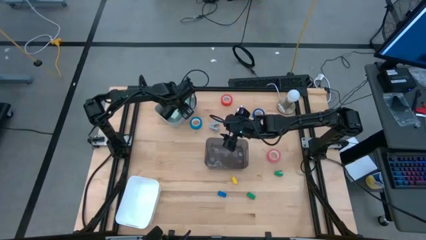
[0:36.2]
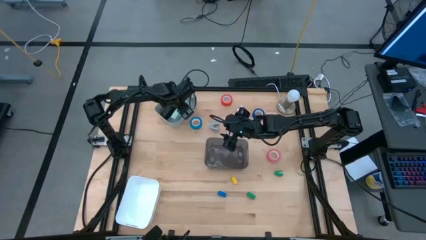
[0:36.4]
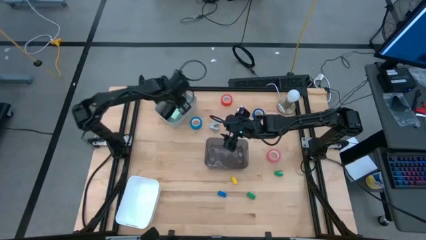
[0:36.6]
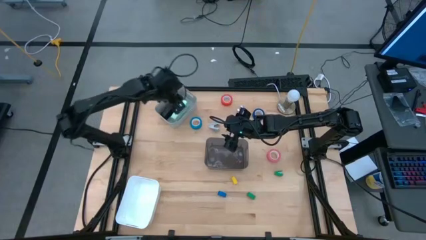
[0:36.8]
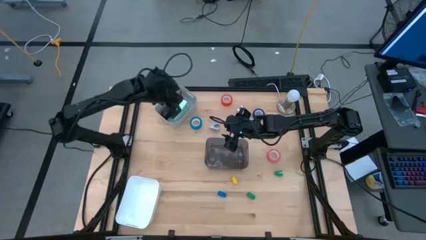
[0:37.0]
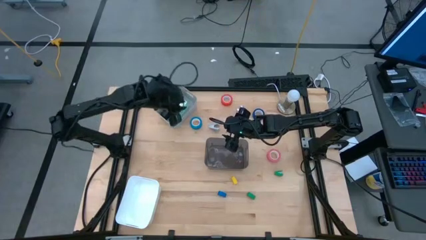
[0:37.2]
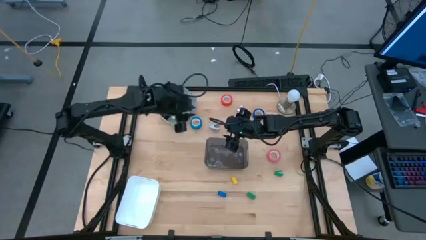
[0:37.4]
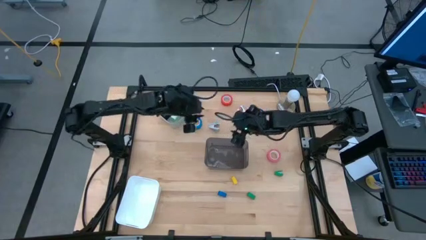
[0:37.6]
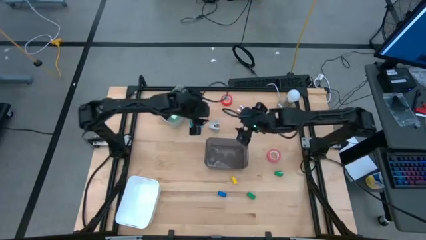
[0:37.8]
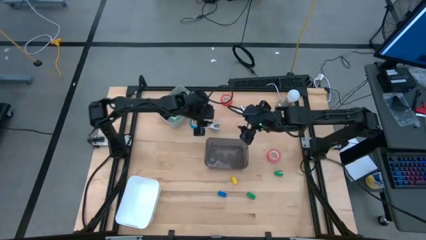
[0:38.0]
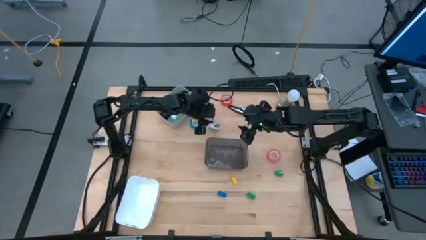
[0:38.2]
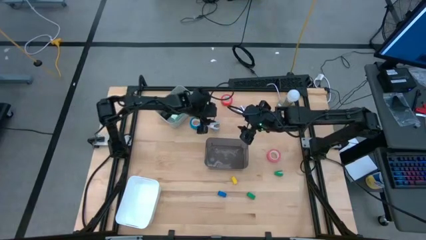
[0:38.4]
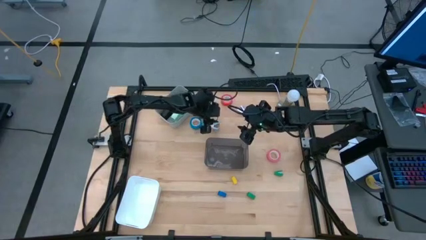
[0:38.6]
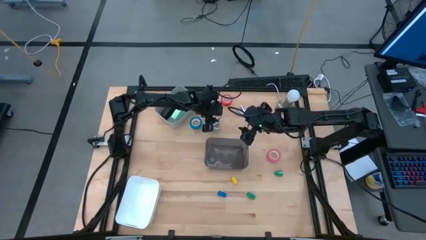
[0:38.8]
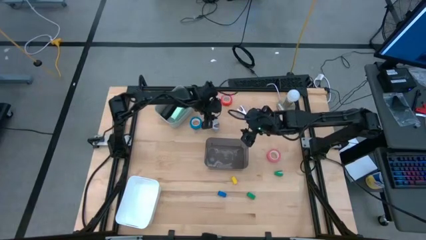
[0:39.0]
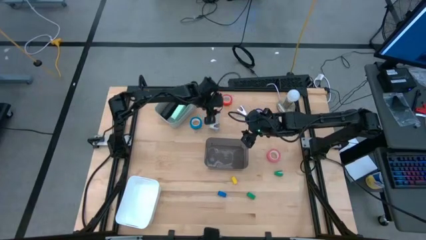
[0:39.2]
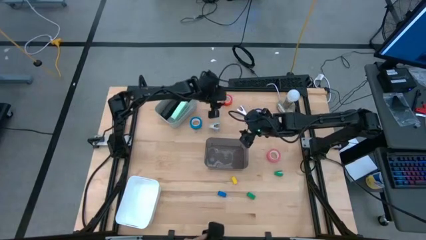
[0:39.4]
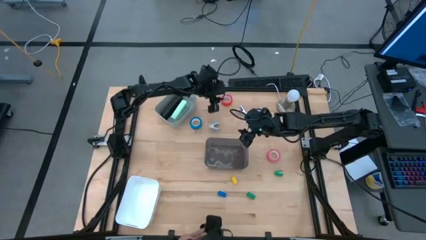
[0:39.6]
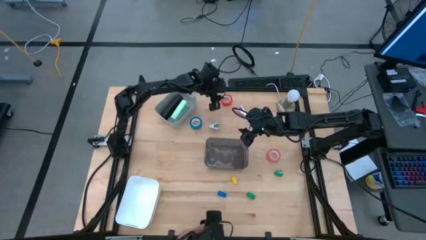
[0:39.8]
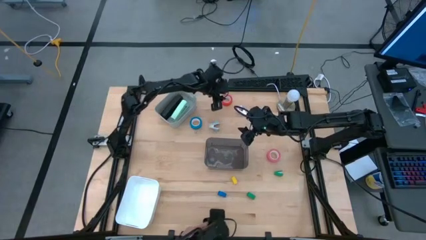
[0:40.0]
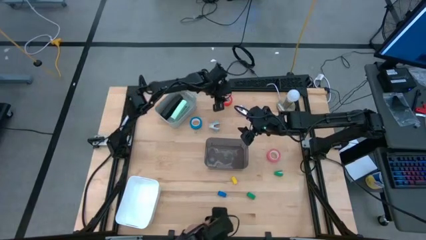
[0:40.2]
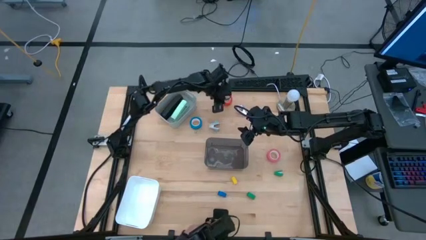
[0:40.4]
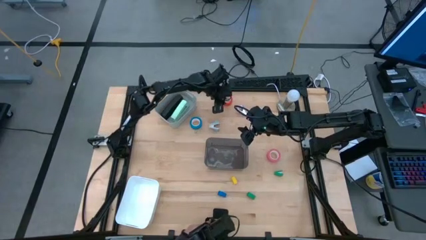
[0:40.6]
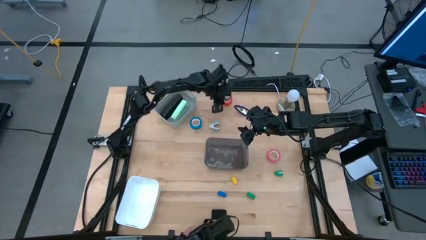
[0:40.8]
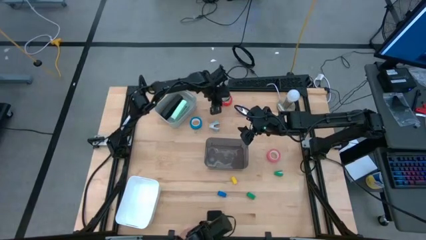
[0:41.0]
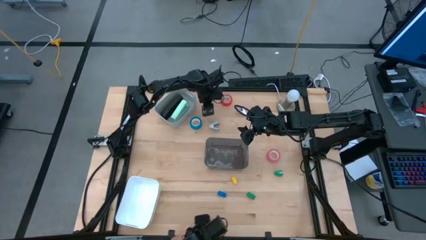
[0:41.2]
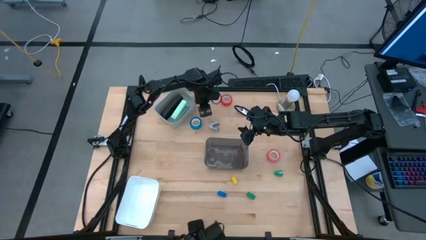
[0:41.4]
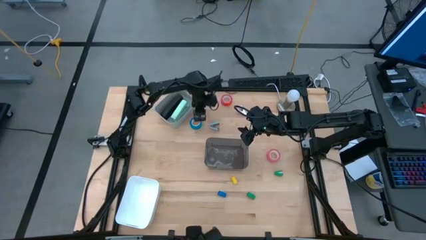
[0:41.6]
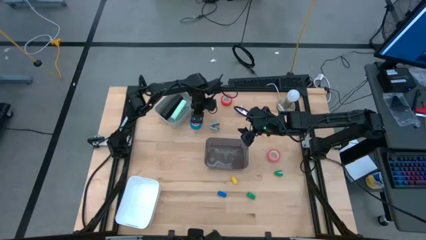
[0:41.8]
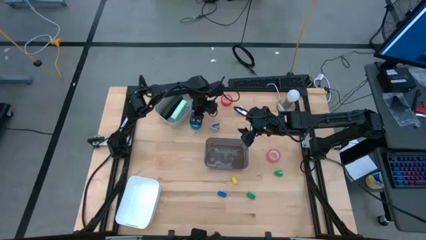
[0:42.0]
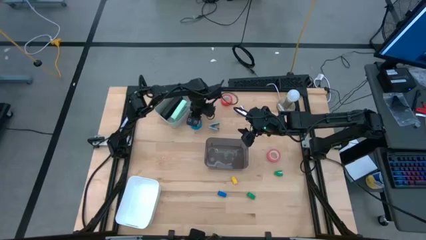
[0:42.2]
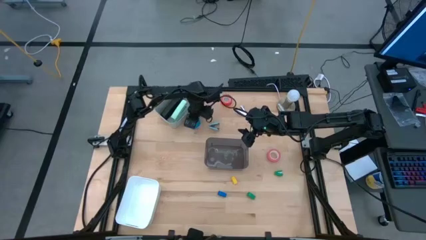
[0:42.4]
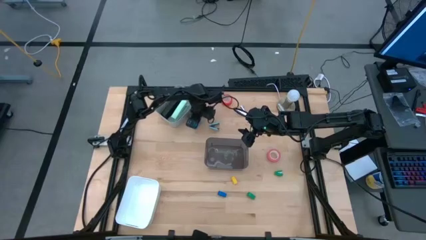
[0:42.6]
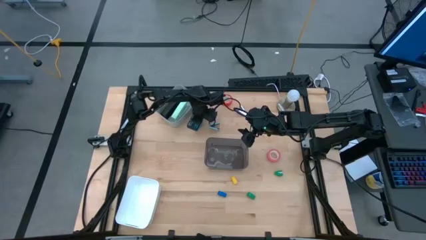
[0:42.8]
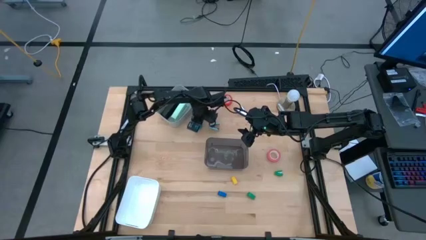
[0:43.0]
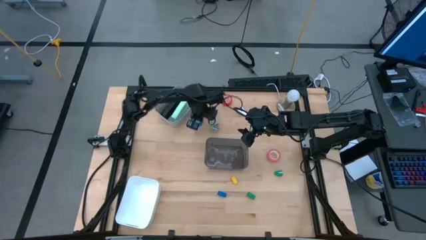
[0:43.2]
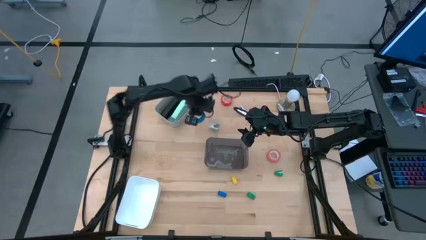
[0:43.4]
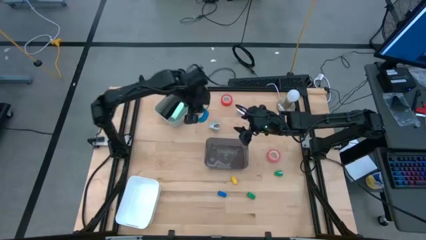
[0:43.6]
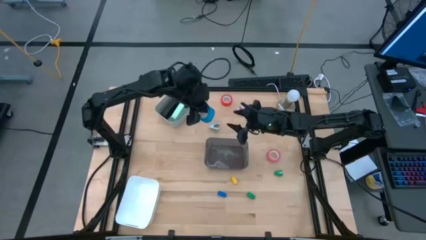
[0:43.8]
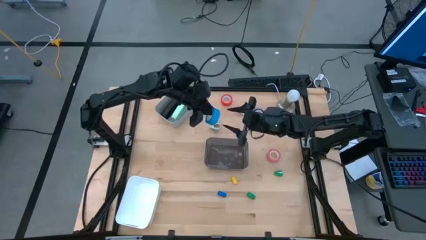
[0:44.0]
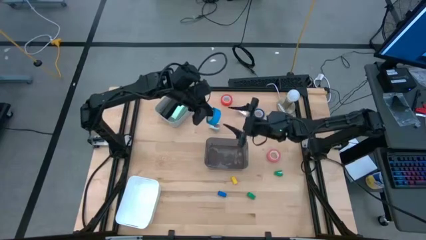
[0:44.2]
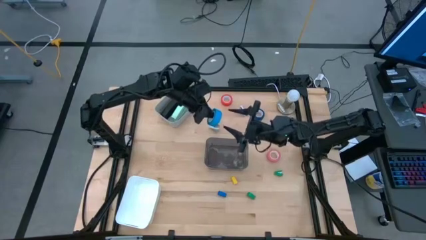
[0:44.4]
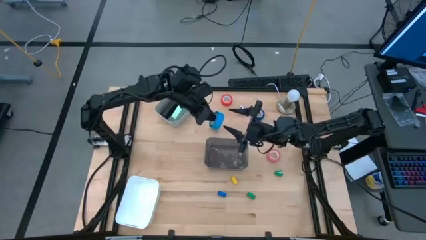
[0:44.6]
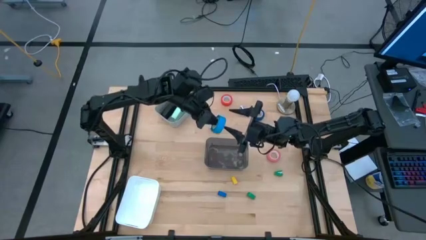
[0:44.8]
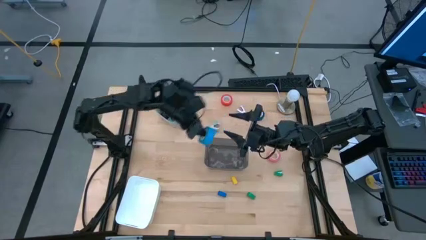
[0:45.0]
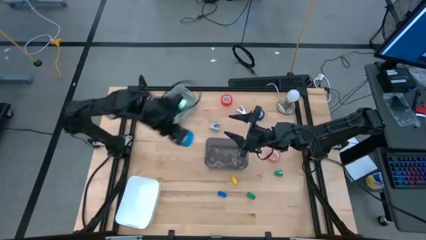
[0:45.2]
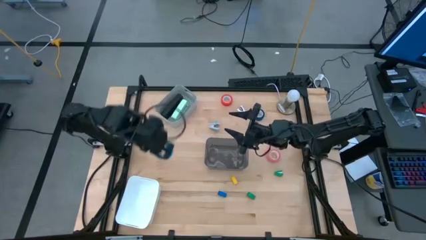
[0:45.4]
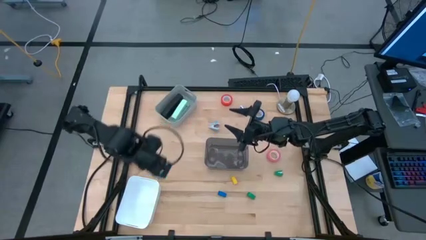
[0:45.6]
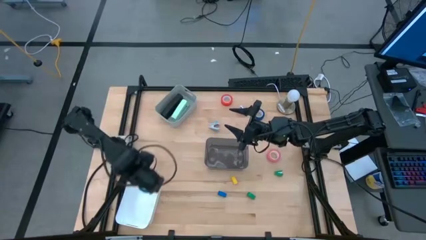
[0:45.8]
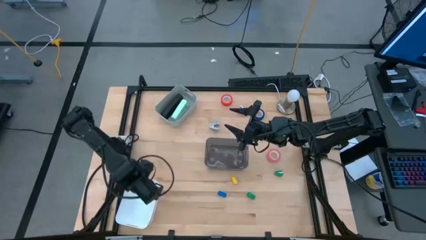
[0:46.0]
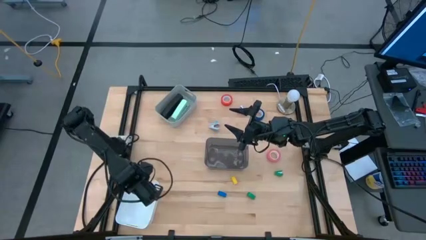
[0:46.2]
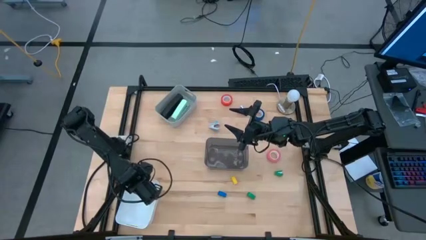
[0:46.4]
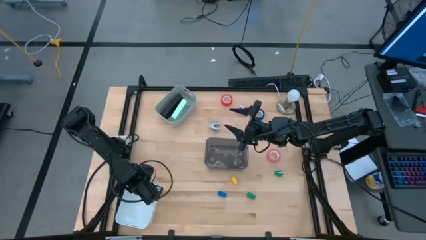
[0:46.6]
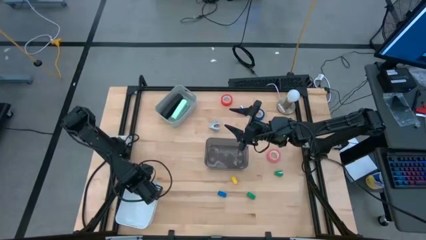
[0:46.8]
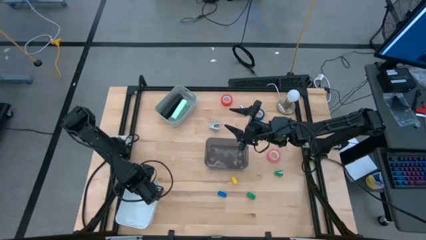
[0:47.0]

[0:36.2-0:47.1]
Task: Pick and place Stapler, Stapler remover, tape
Put the light blue tape into the white bin
